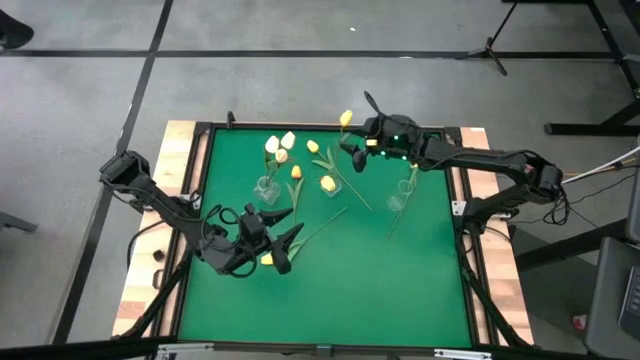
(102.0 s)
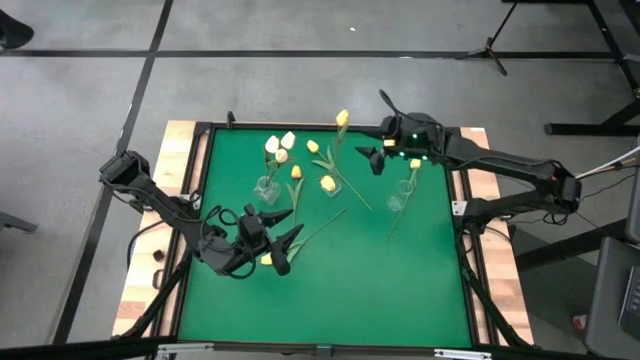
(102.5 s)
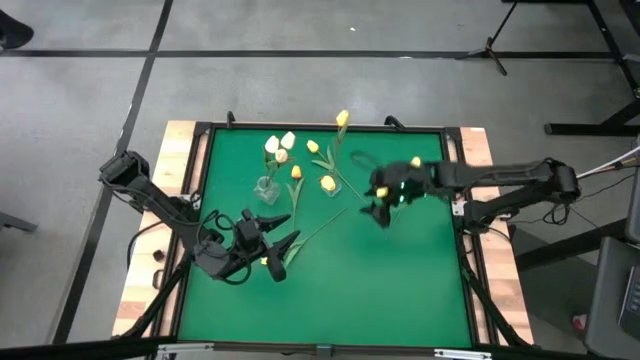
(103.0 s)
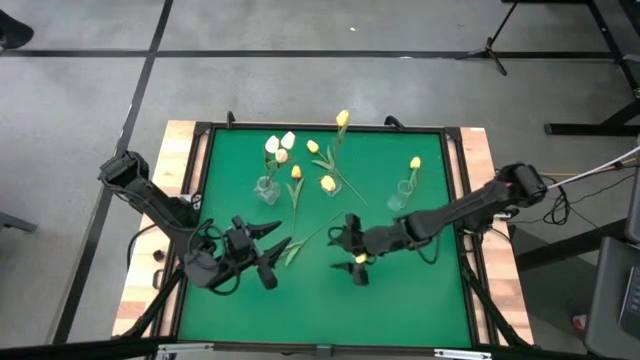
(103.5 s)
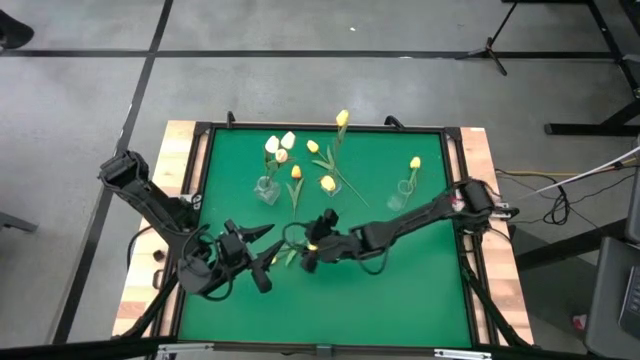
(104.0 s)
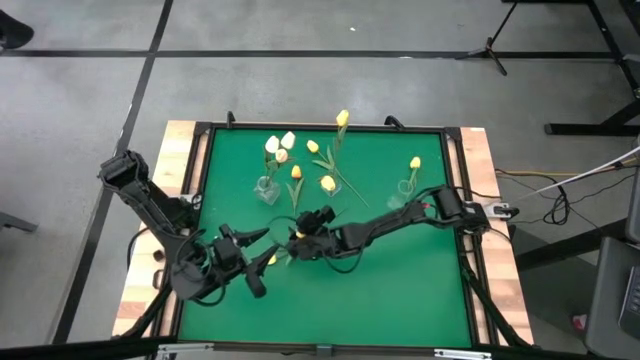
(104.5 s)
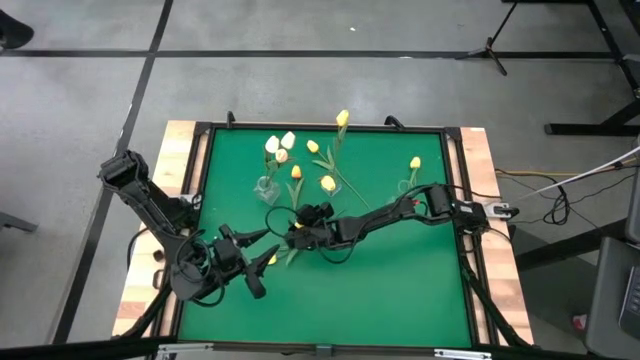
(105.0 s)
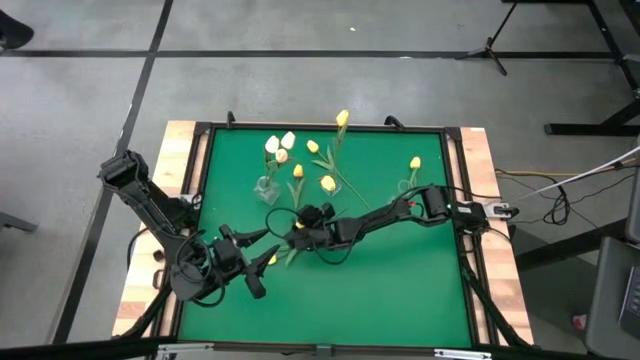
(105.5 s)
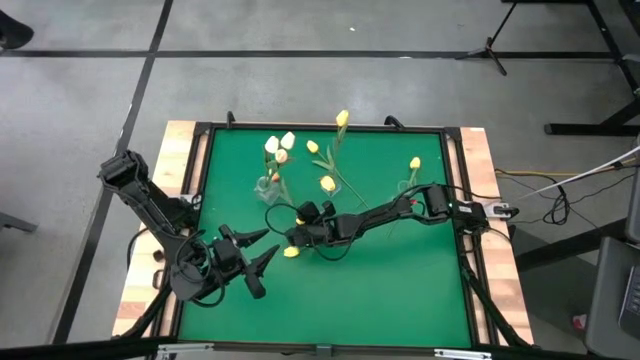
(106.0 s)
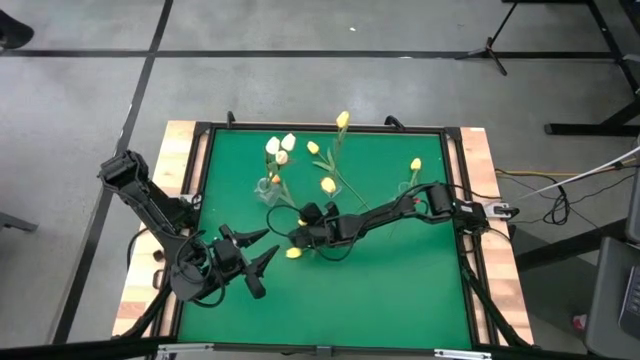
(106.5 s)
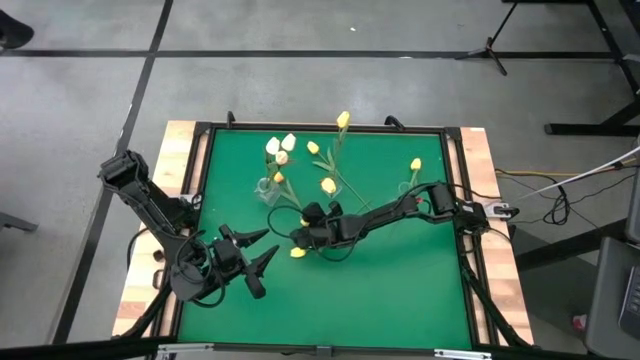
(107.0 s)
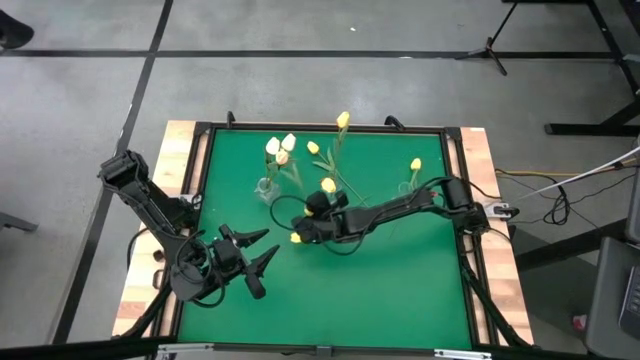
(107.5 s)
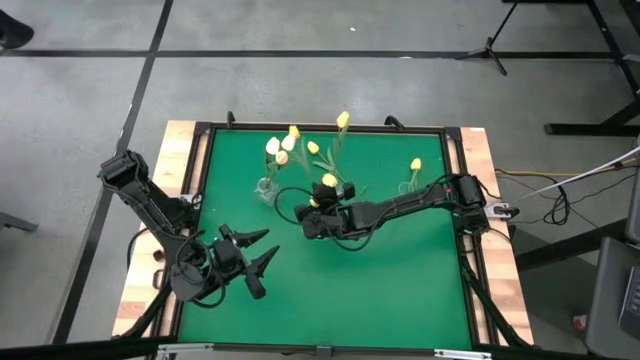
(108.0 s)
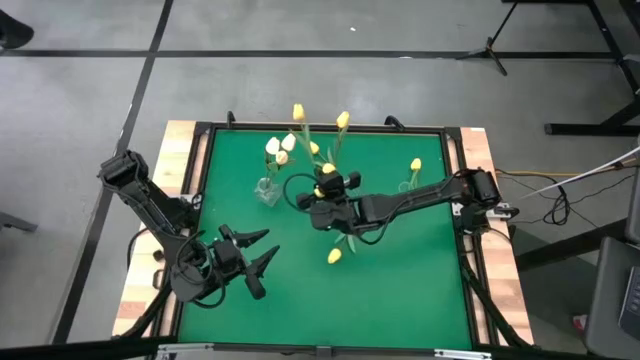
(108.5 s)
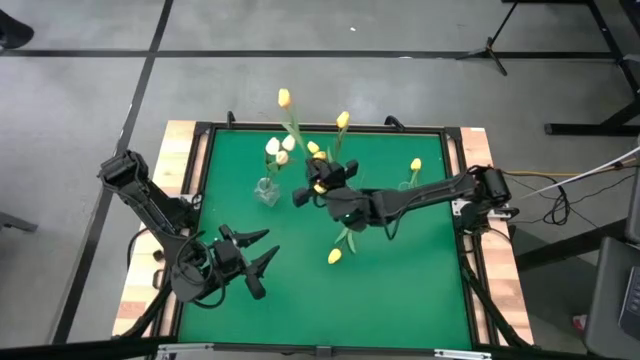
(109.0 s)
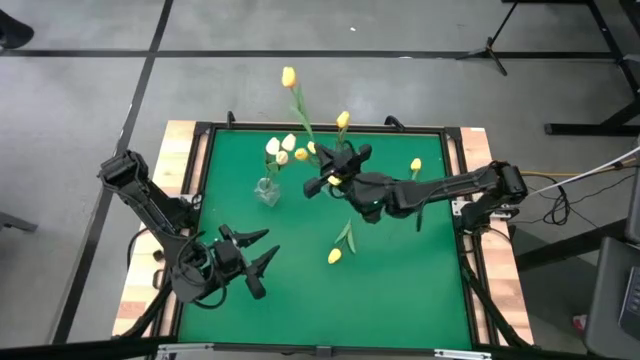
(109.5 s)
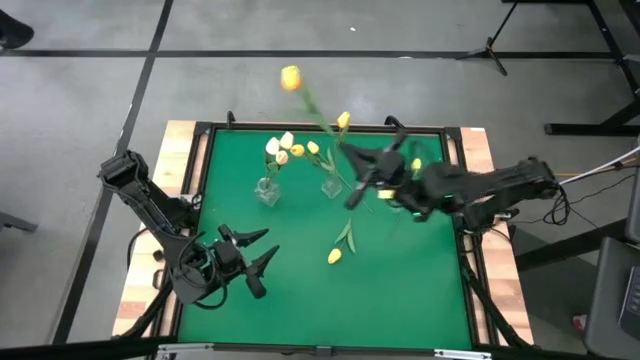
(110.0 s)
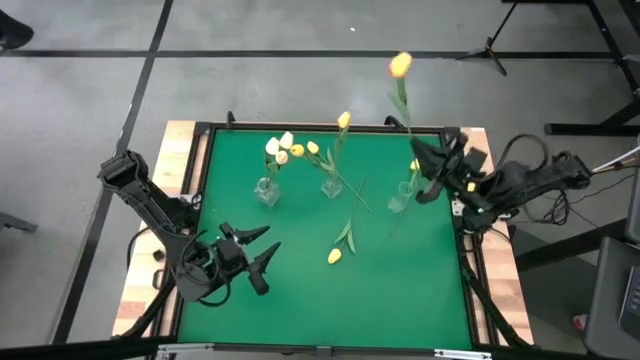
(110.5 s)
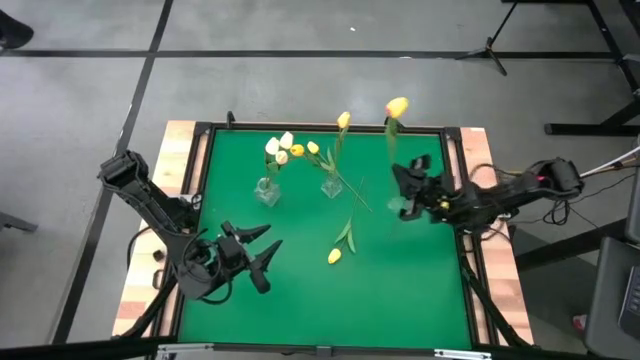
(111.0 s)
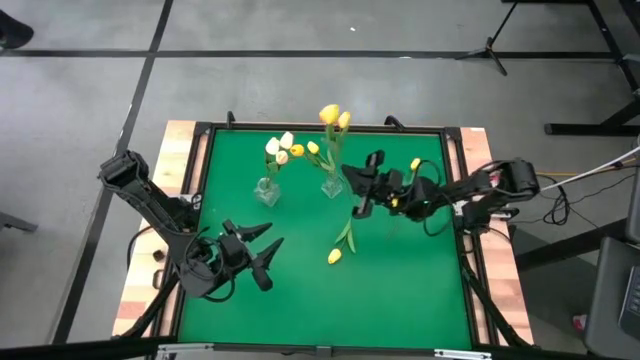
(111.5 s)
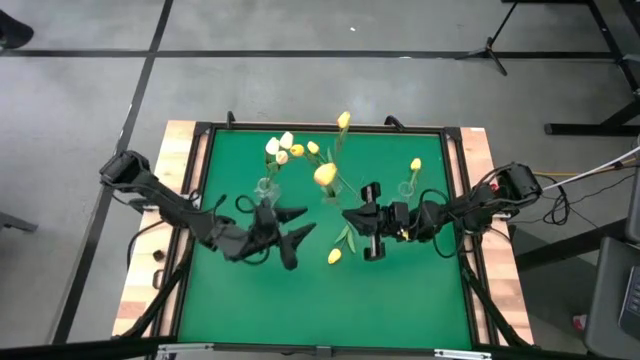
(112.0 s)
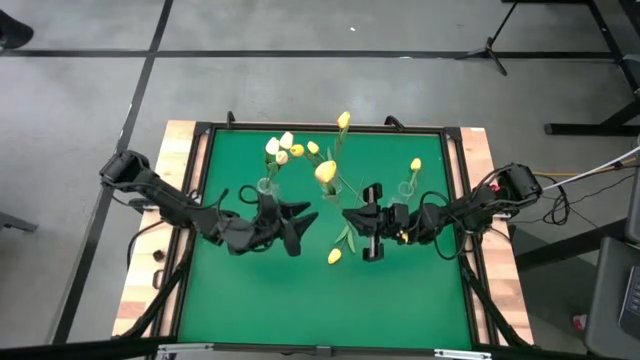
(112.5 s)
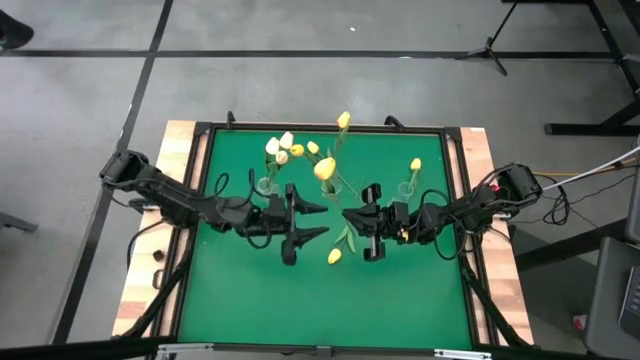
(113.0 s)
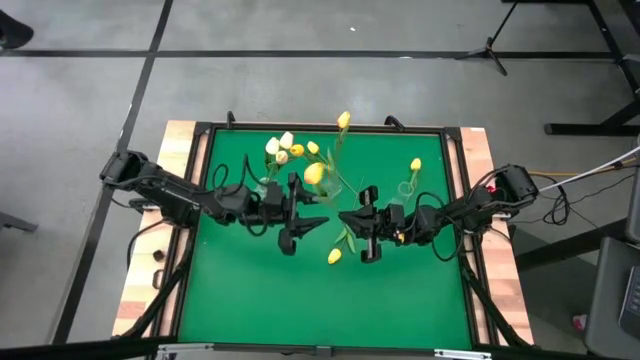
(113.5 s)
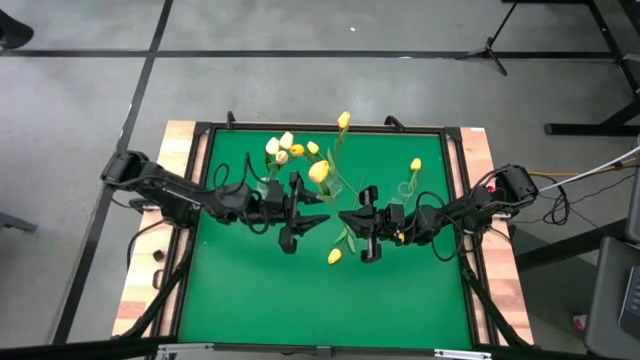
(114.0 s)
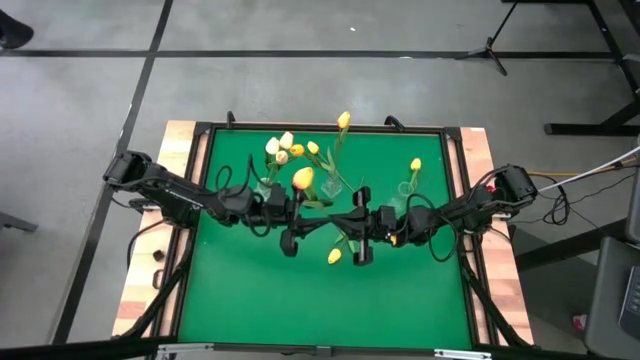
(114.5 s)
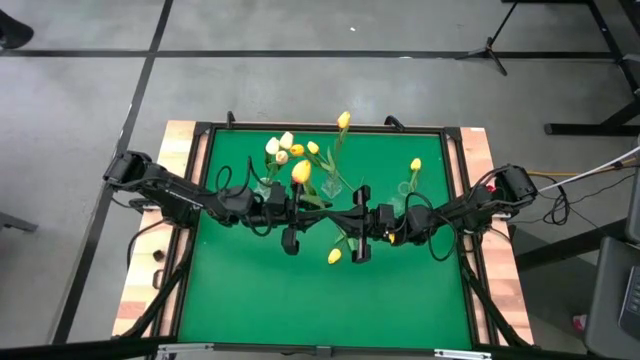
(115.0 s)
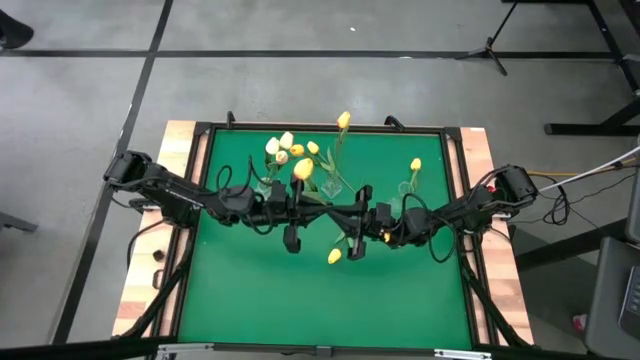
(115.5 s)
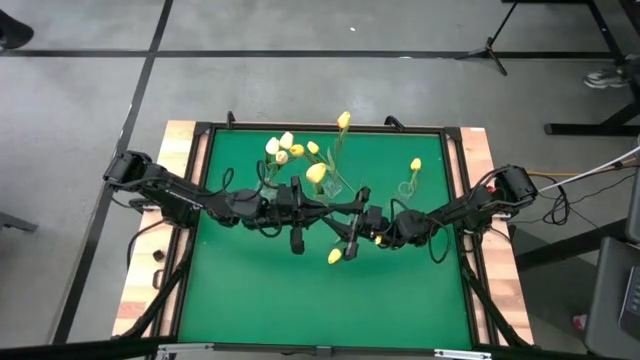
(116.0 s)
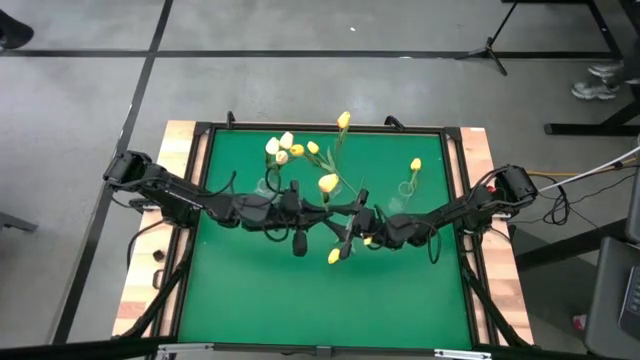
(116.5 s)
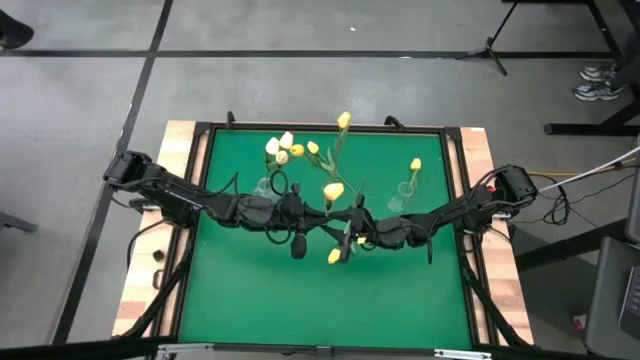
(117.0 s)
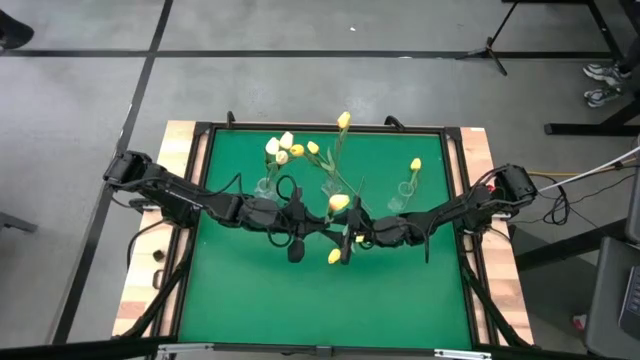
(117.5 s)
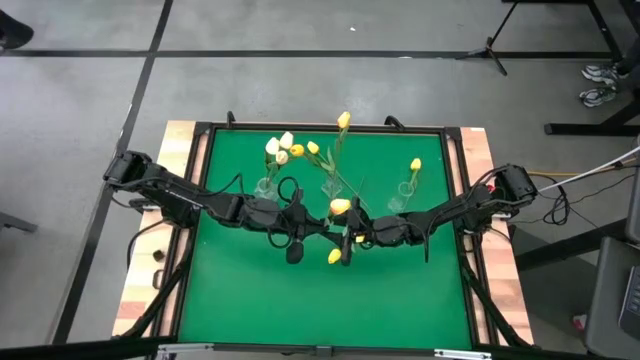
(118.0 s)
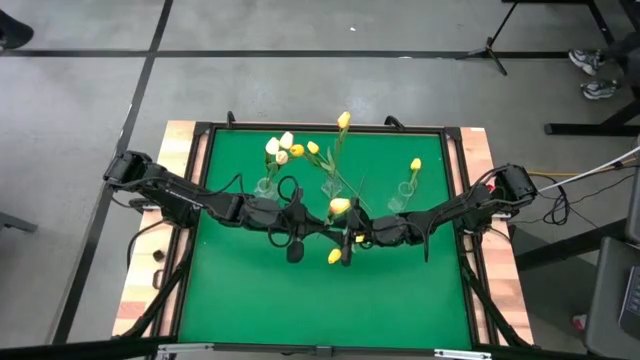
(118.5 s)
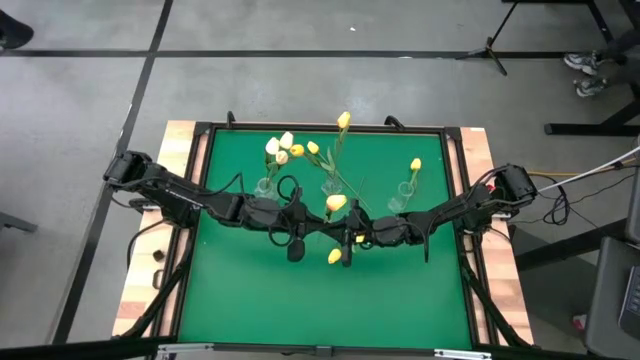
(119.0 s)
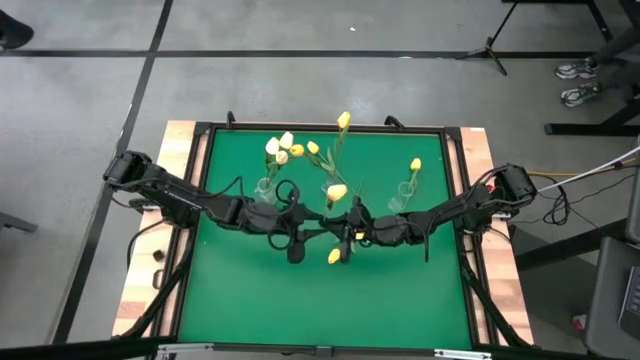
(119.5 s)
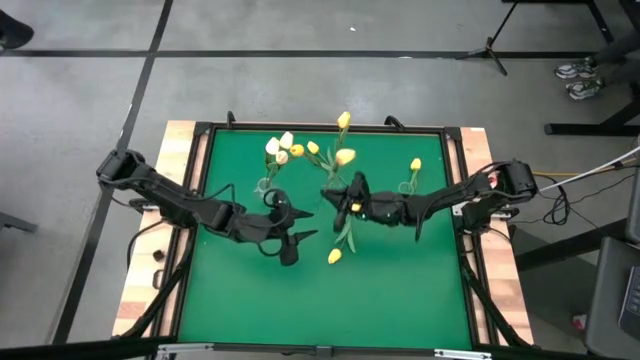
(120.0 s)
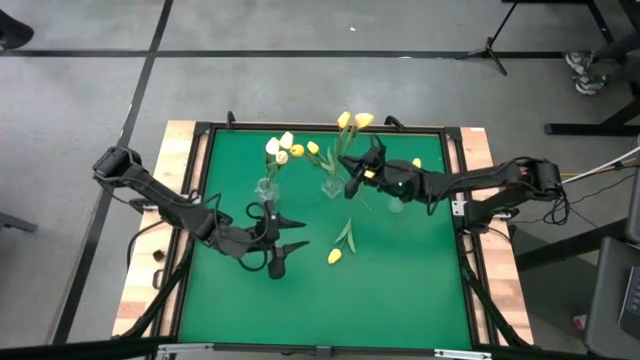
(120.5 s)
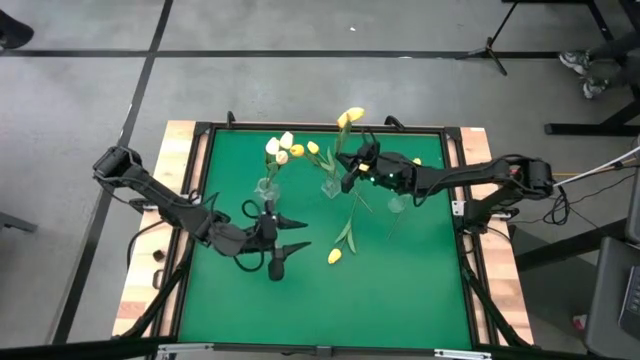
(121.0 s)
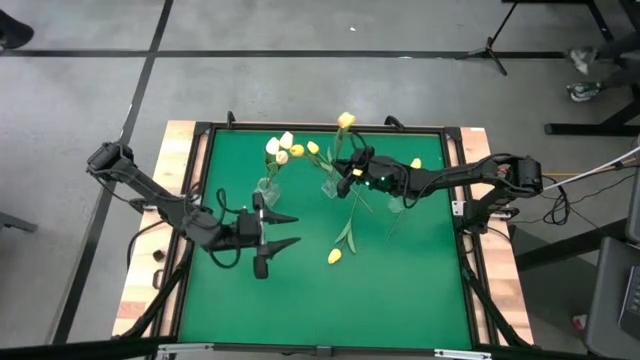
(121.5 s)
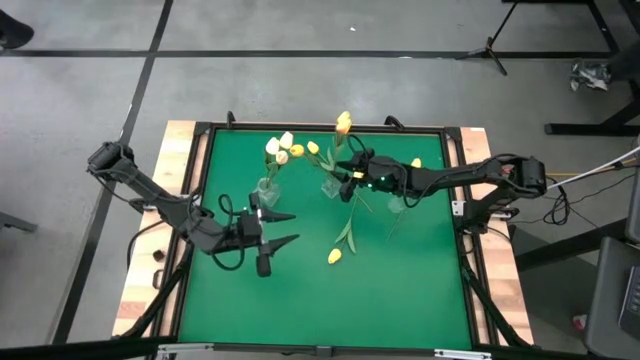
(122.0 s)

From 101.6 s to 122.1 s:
Task: Sort flowers into vase by color
Put the yellow with orange flower into the center transparent vase

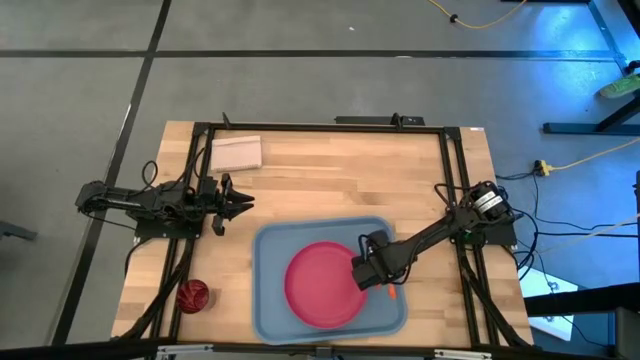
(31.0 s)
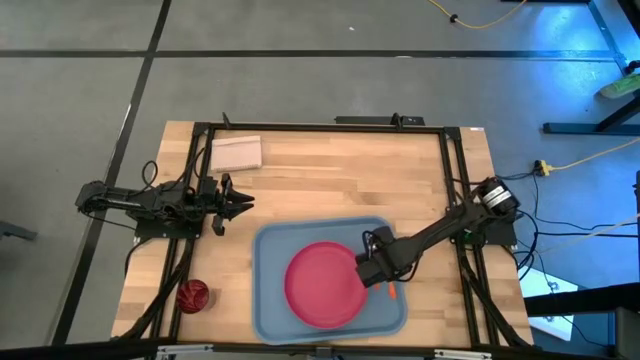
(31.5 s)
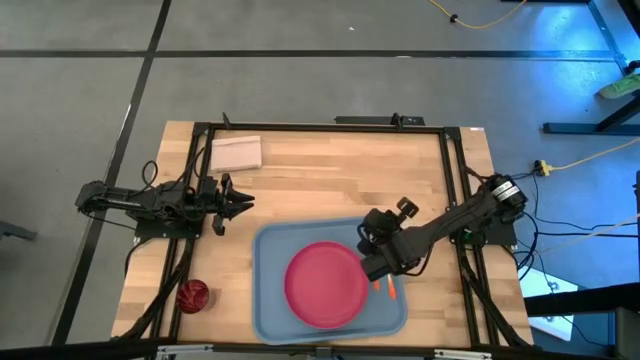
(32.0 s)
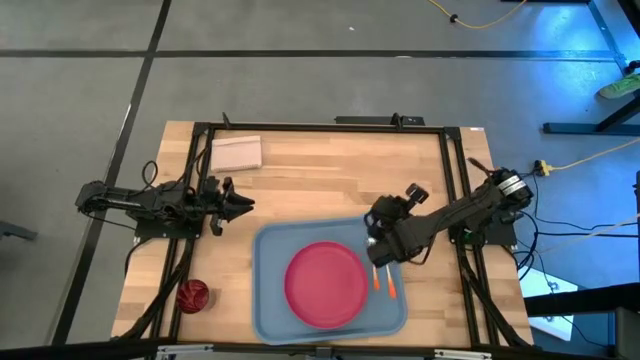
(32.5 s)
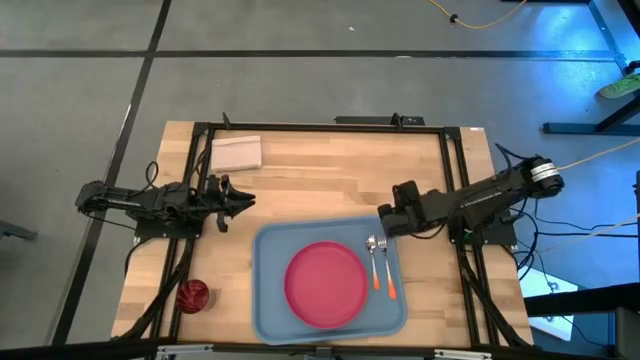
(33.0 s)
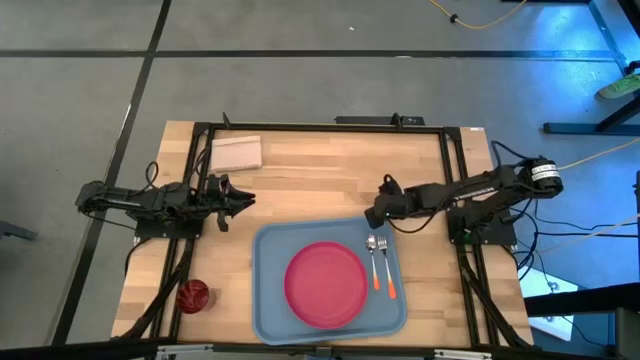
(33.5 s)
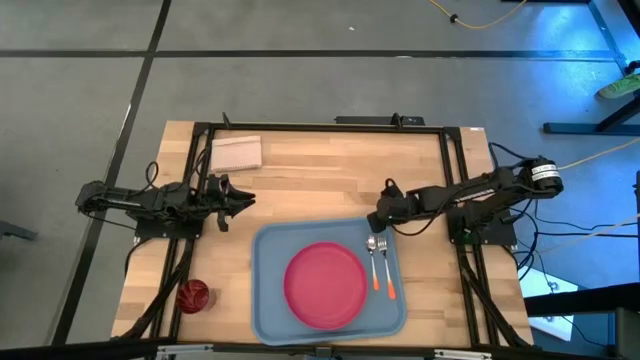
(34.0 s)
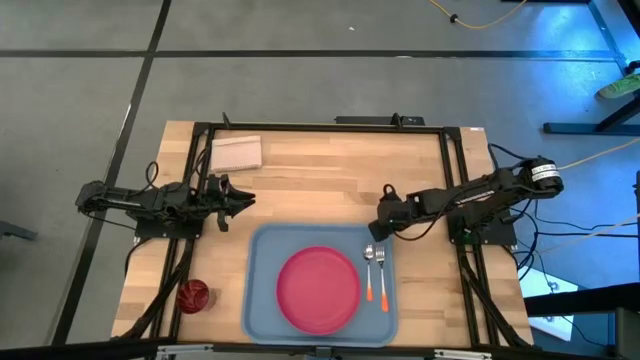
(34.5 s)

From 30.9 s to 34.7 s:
Task: Pick and place plate/cup/fork/spoon on tray
Adjust the blue tray
